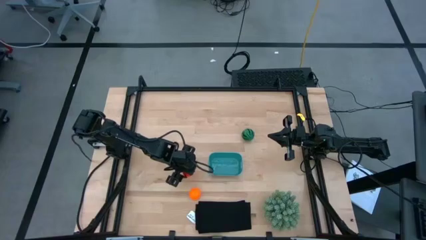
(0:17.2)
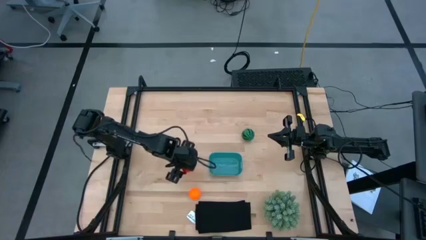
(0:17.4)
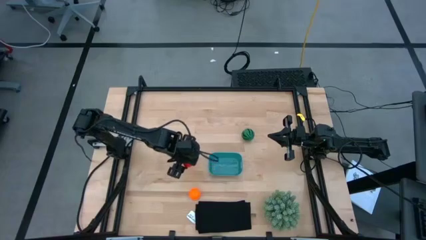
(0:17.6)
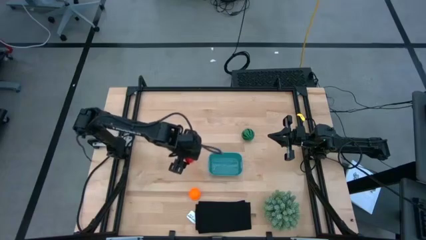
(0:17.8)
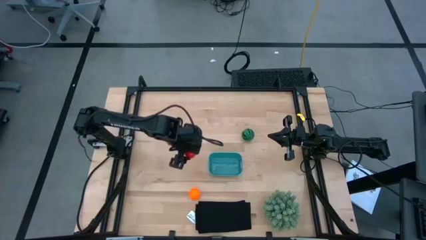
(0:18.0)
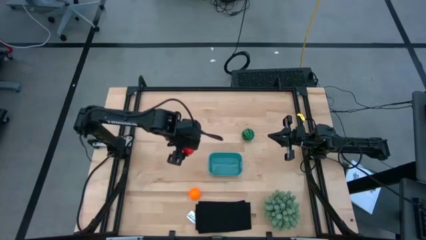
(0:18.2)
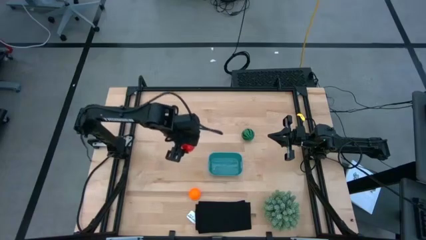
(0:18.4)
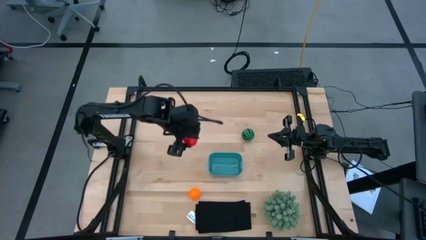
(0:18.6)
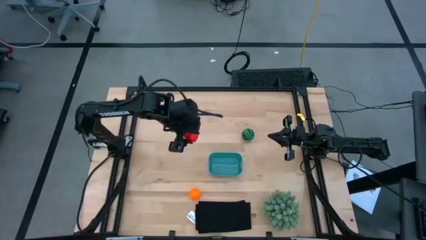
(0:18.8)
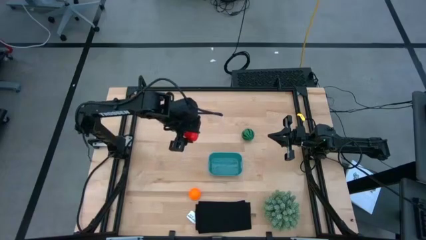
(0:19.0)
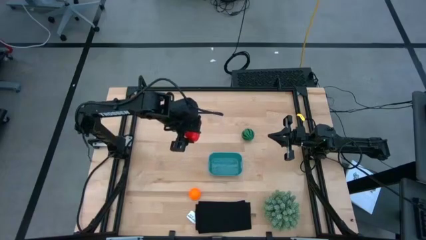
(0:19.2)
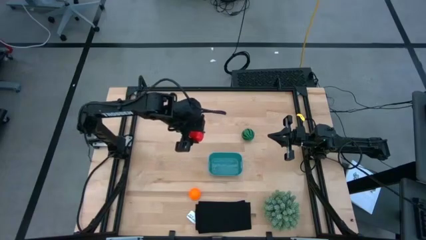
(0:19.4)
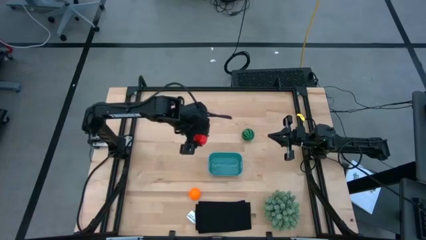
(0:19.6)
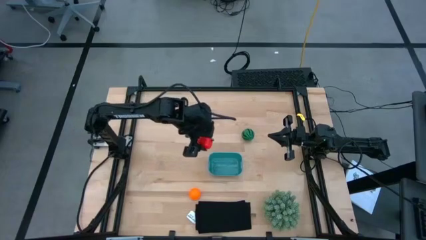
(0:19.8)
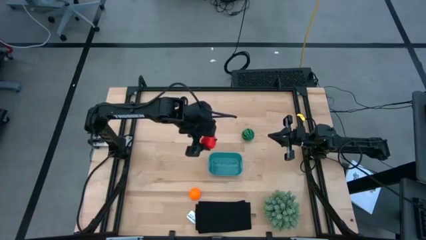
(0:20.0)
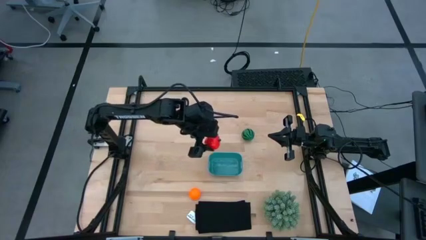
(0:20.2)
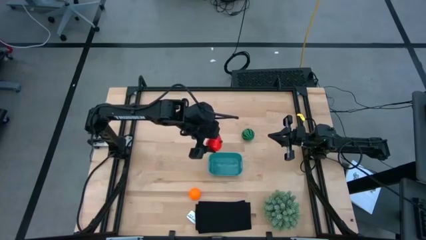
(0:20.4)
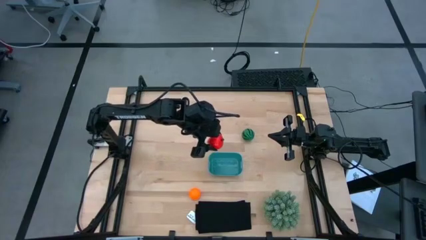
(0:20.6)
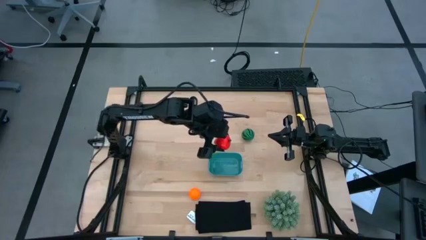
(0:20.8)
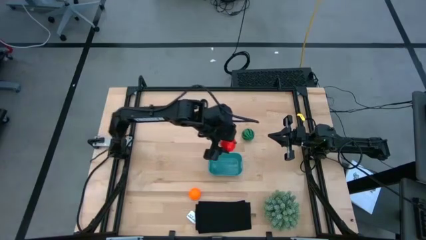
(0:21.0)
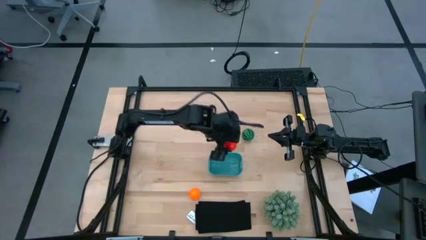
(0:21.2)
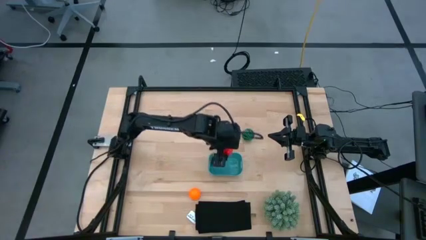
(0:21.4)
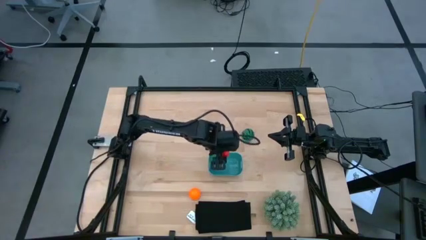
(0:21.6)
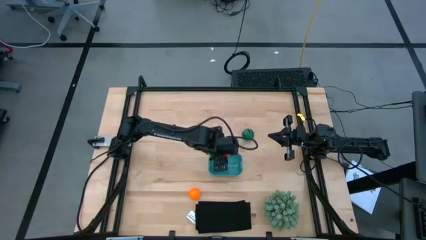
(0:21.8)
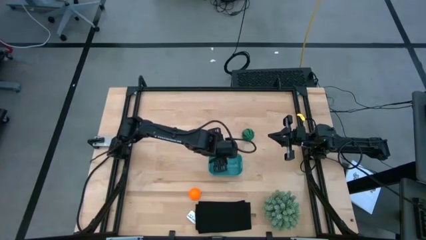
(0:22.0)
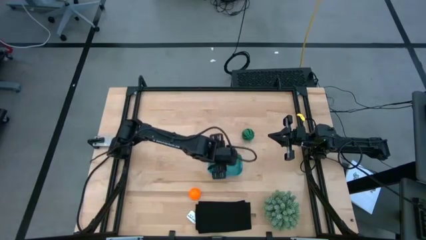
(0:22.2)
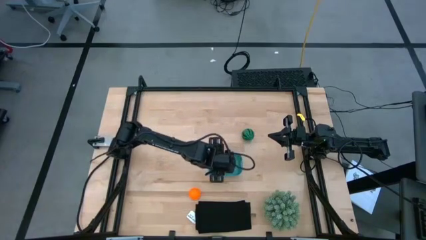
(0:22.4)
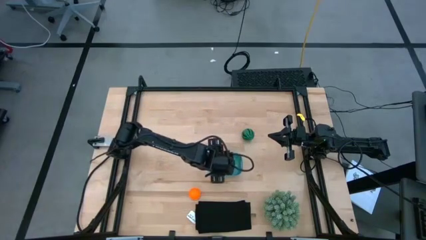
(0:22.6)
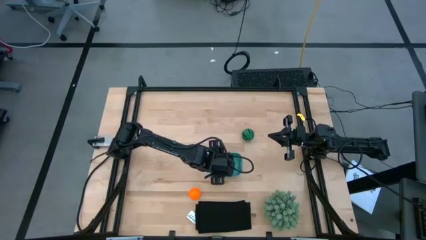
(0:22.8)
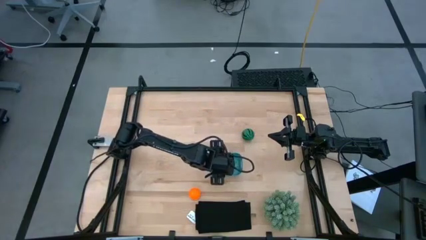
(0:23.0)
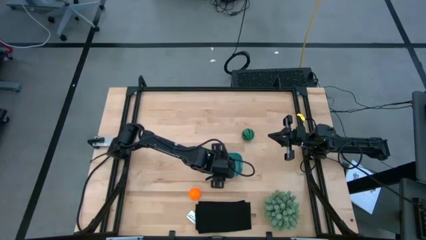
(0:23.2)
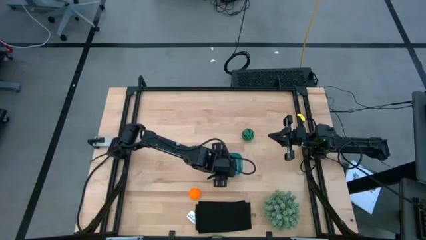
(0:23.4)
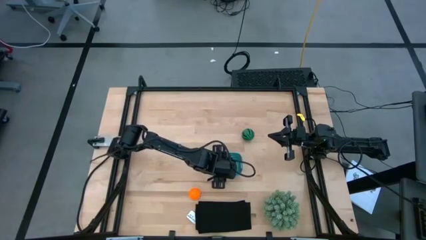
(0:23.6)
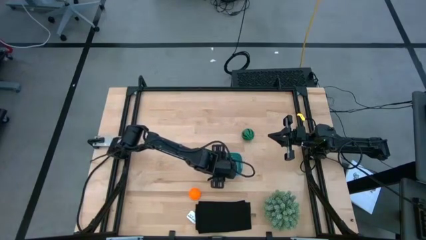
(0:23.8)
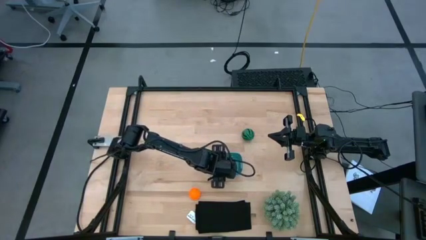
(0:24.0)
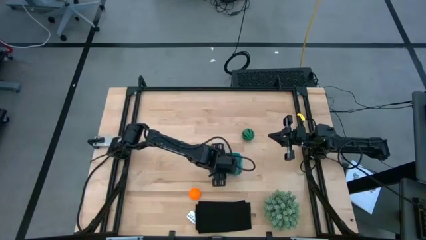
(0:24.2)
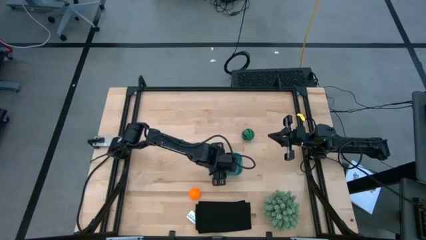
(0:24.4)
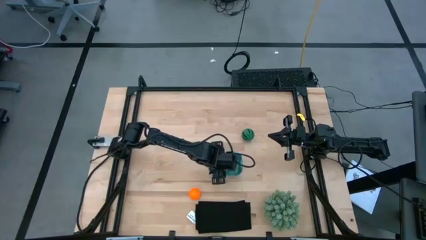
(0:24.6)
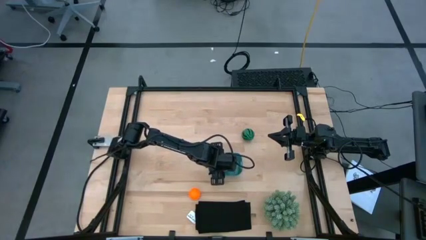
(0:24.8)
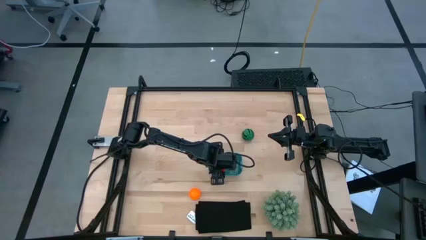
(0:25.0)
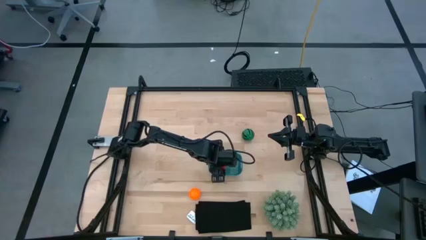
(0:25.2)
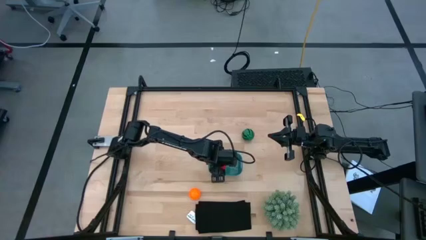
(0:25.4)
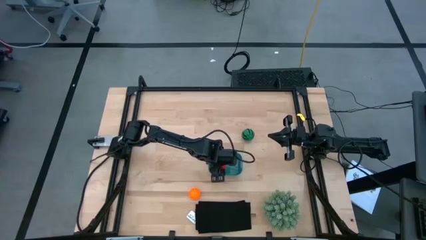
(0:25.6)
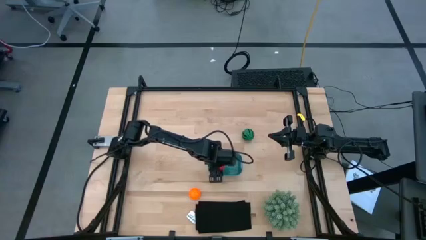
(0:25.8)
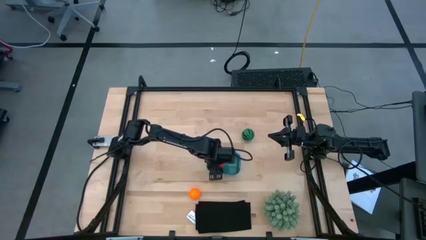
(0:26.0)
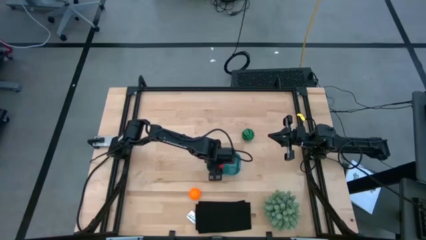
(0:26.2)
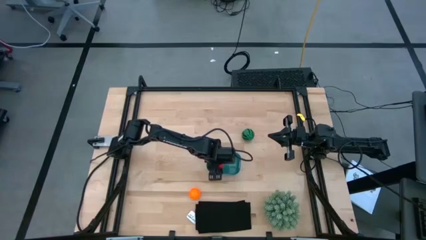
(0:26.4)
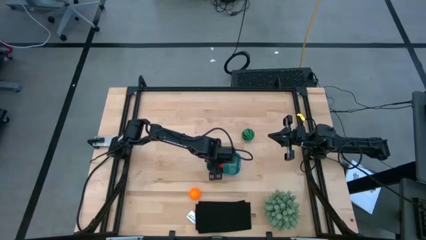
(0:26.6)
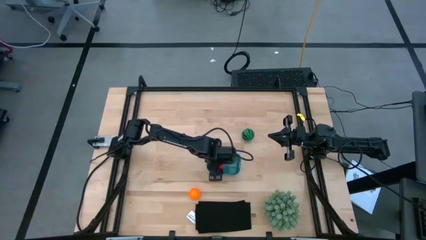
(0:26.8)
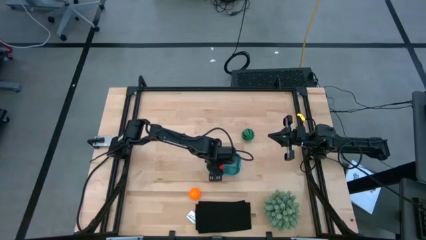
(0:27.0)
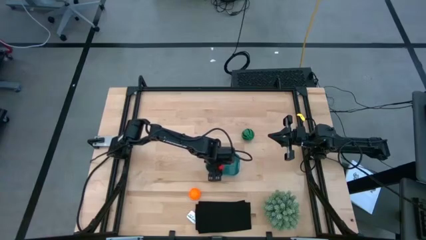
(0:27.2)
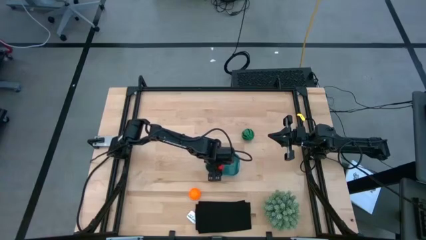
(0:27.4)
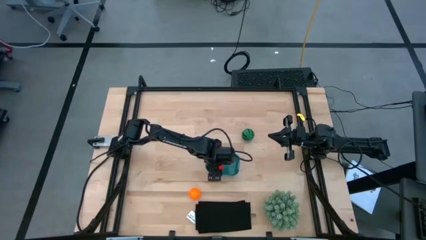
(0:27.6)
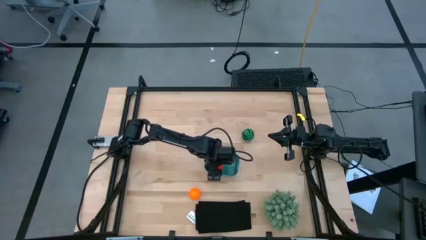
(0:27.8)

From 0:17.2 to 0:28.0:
Task: Pick and placing Produce into tupperware
Put the red apple into the blue container
